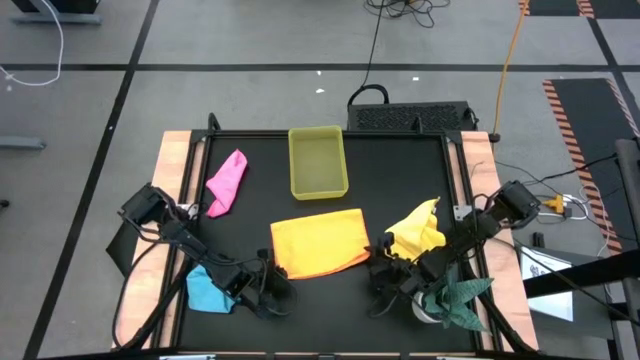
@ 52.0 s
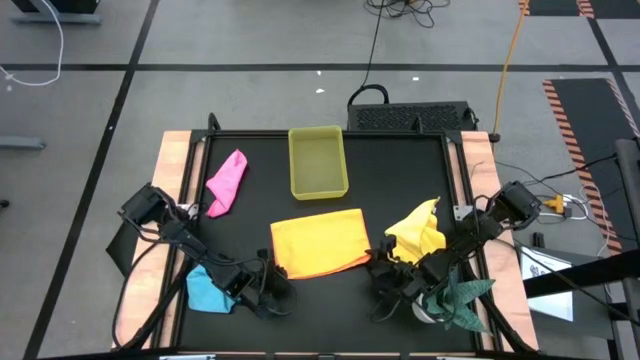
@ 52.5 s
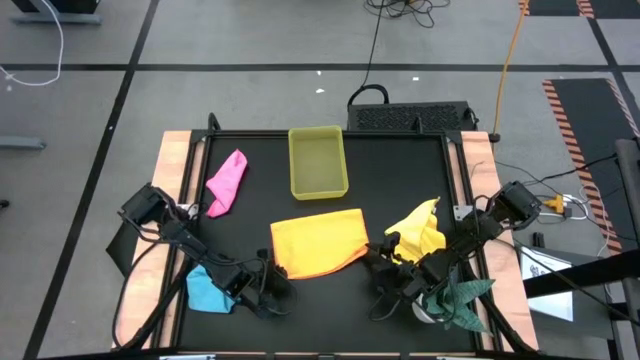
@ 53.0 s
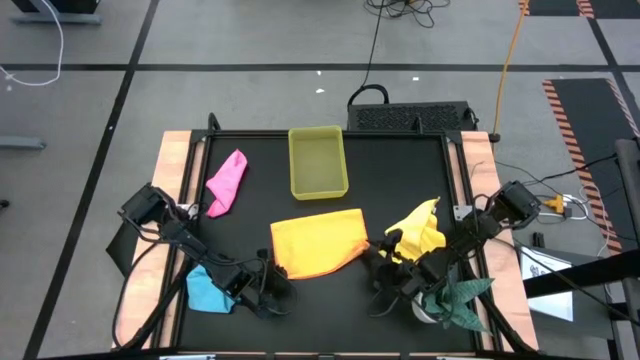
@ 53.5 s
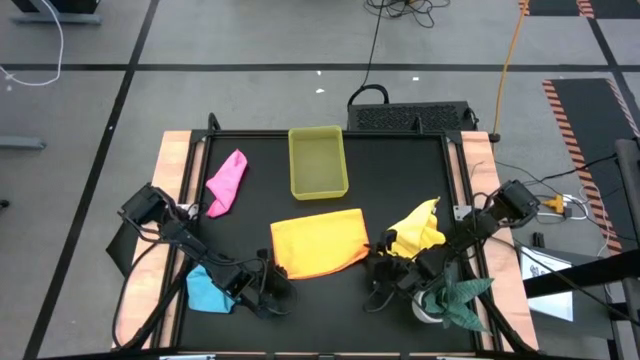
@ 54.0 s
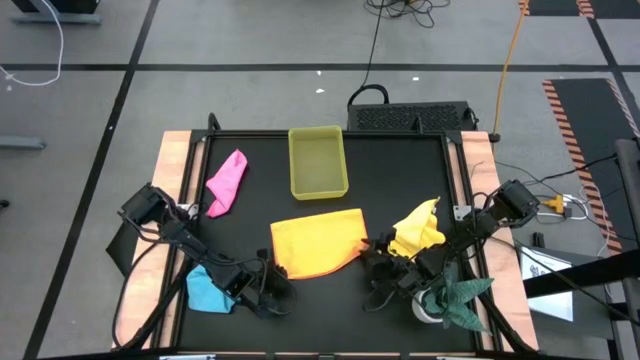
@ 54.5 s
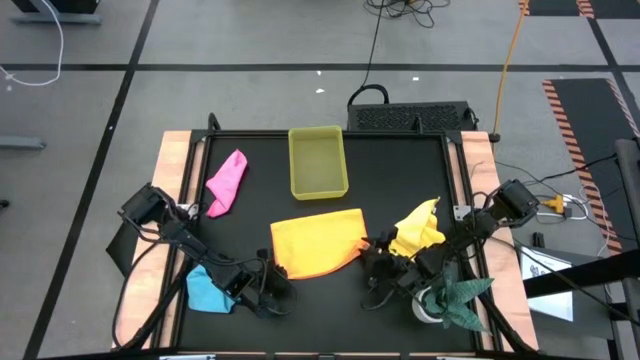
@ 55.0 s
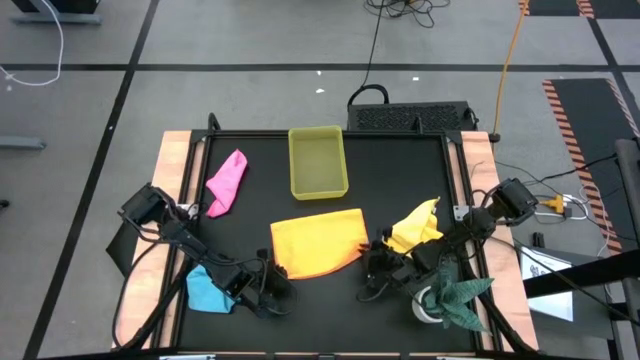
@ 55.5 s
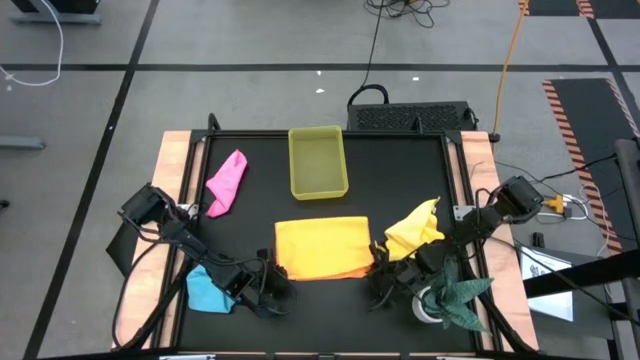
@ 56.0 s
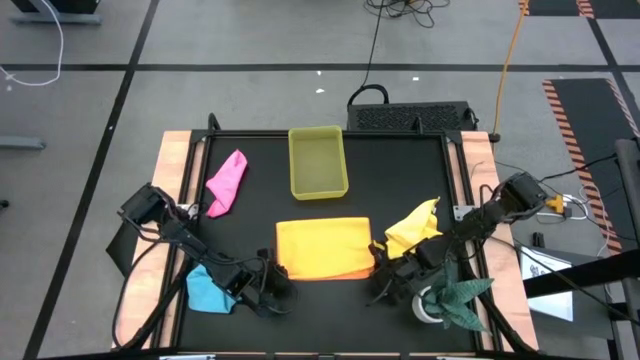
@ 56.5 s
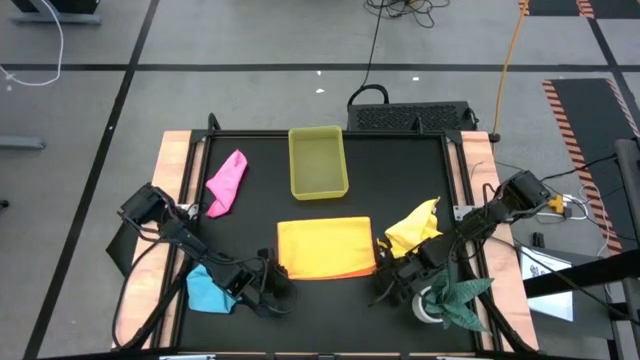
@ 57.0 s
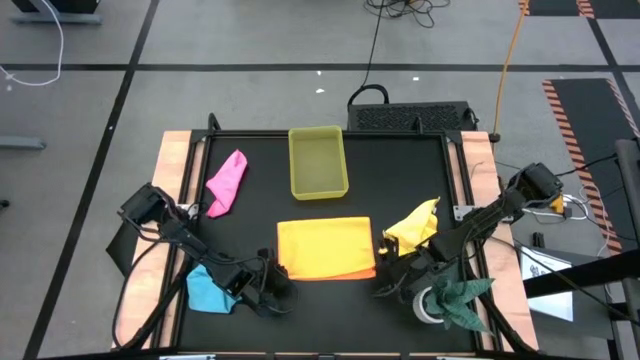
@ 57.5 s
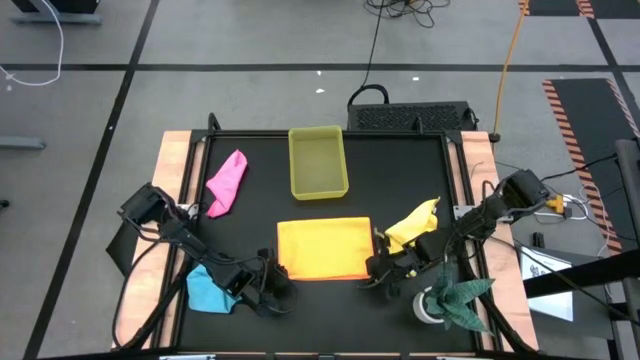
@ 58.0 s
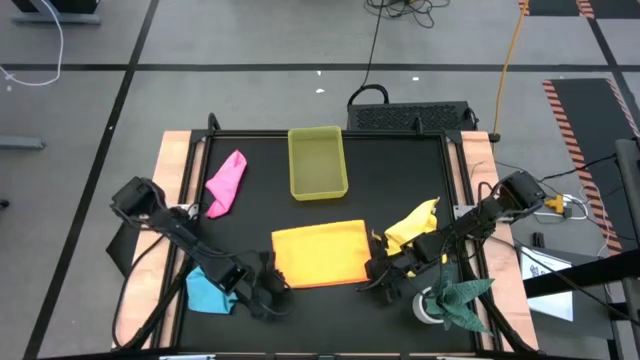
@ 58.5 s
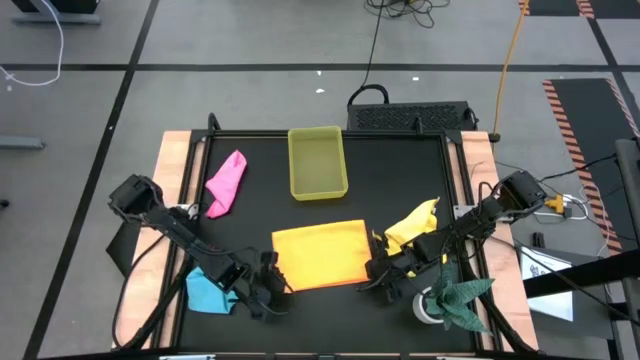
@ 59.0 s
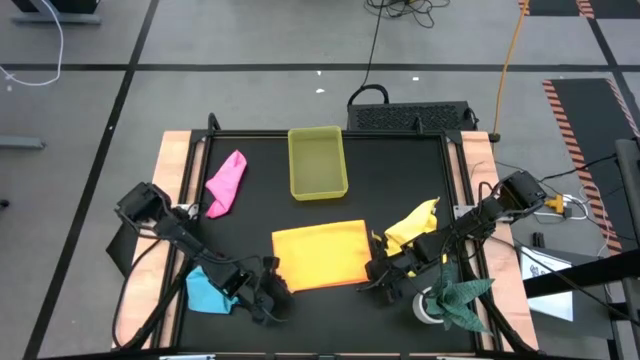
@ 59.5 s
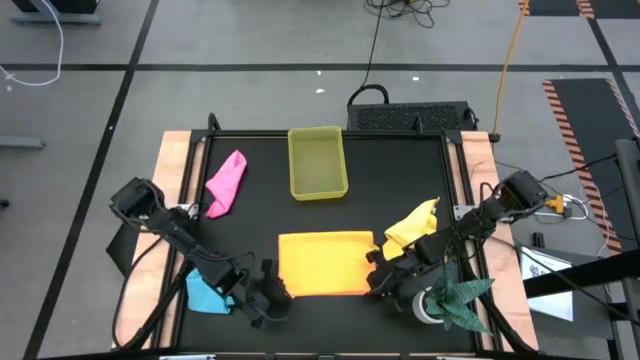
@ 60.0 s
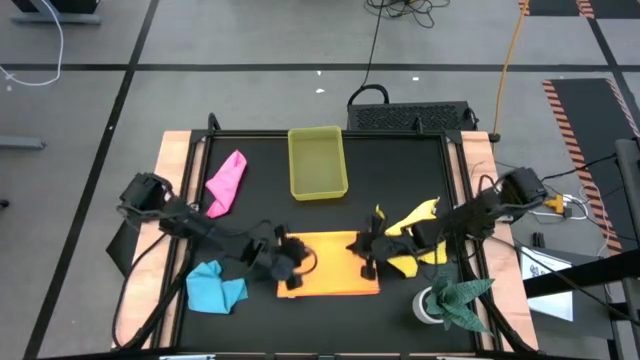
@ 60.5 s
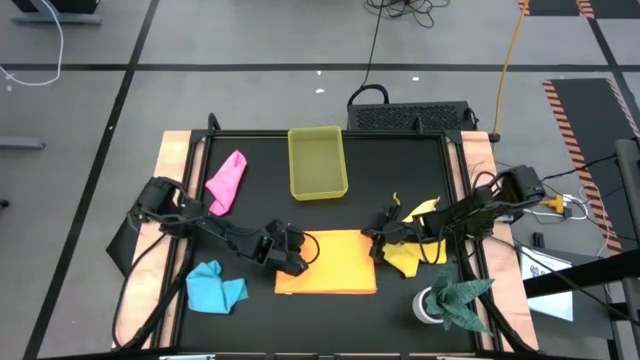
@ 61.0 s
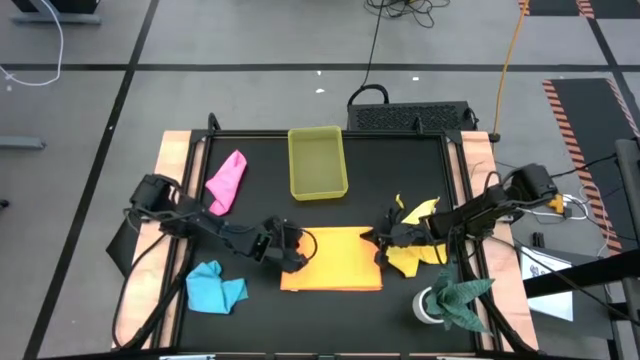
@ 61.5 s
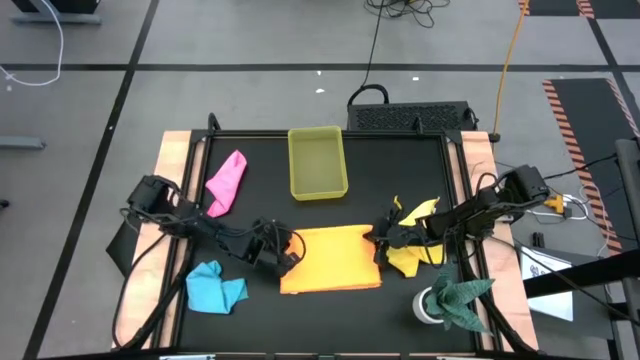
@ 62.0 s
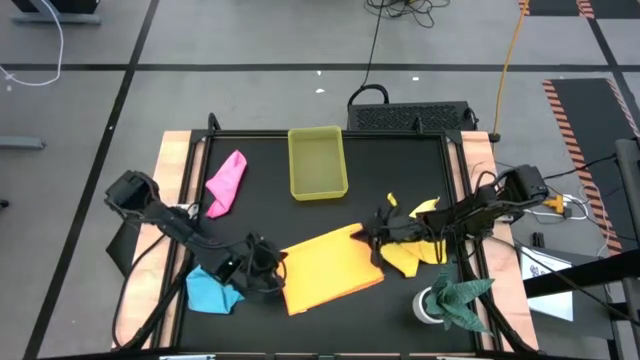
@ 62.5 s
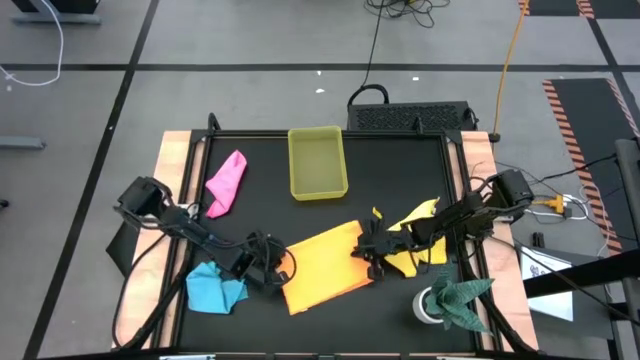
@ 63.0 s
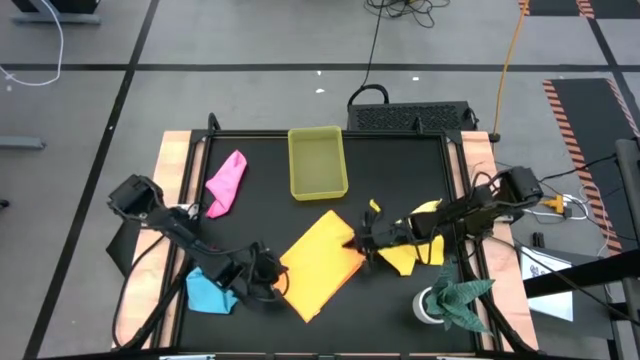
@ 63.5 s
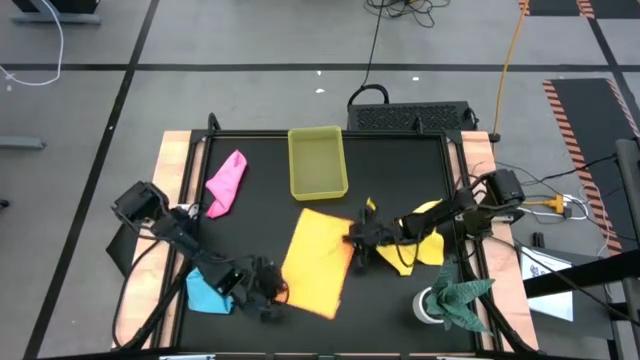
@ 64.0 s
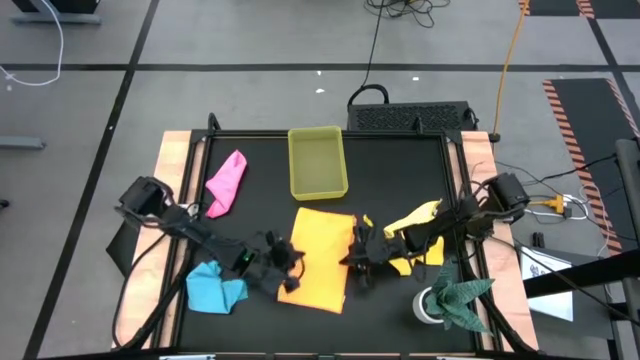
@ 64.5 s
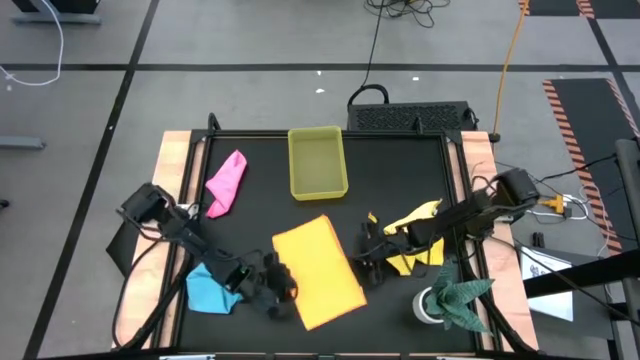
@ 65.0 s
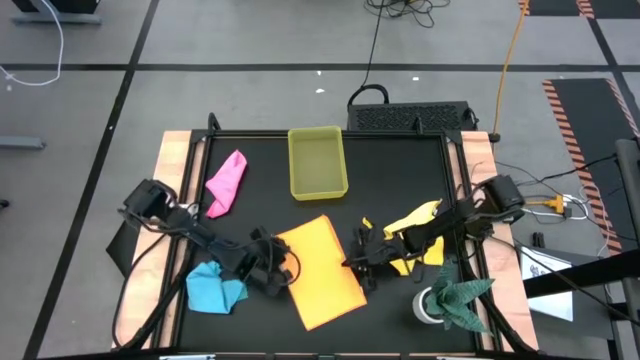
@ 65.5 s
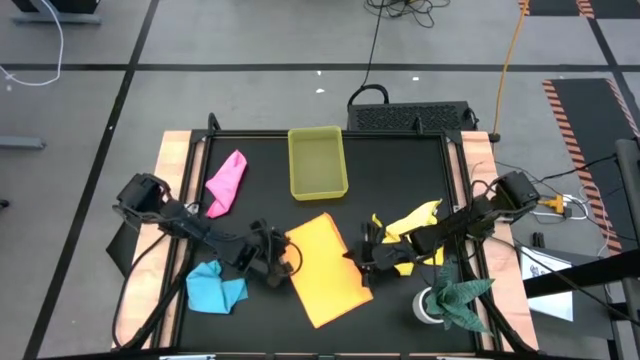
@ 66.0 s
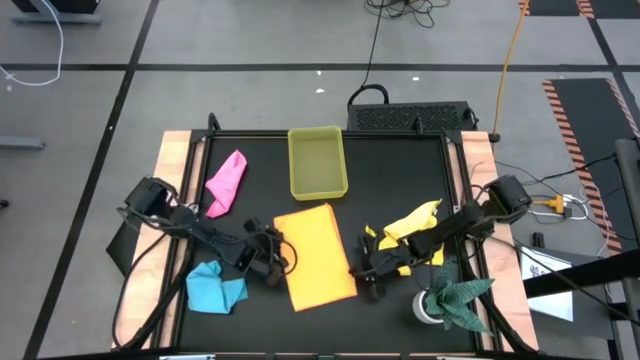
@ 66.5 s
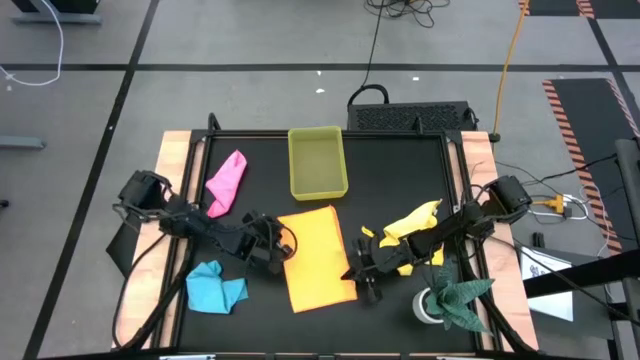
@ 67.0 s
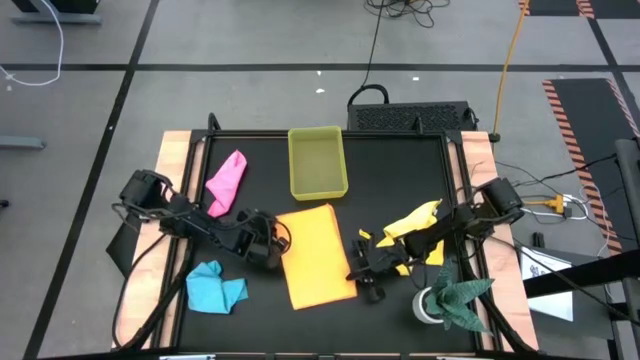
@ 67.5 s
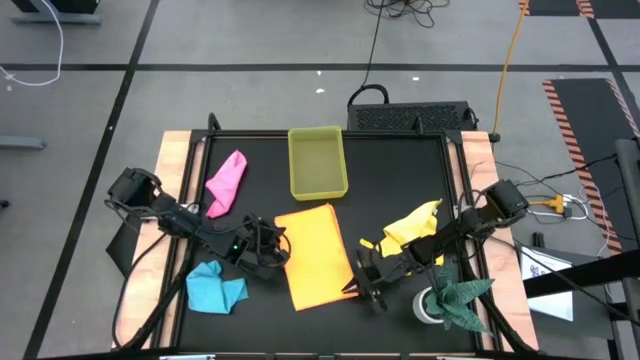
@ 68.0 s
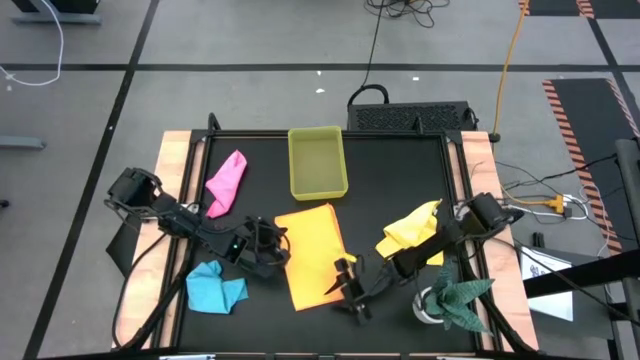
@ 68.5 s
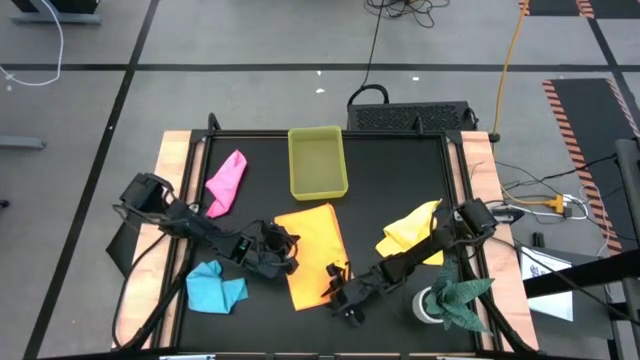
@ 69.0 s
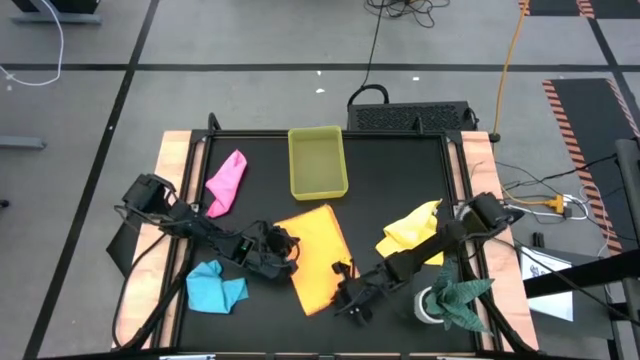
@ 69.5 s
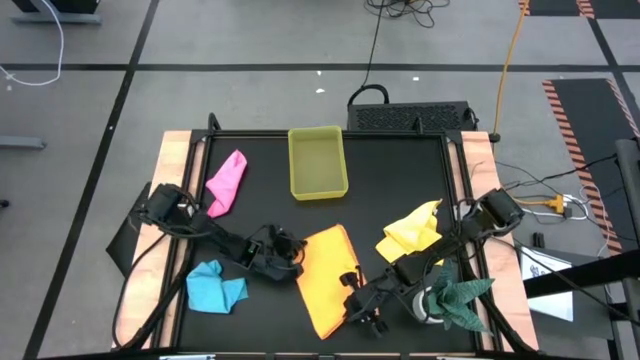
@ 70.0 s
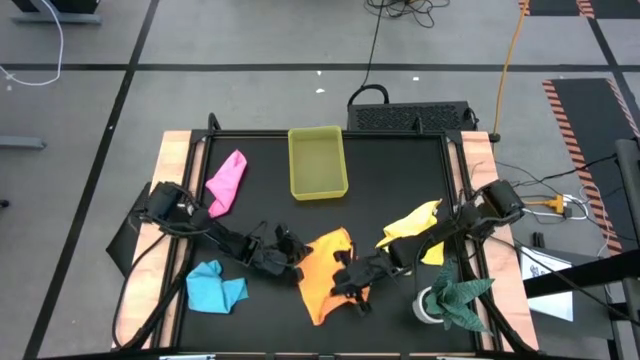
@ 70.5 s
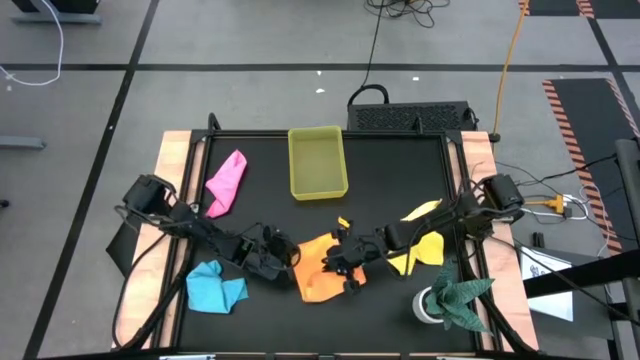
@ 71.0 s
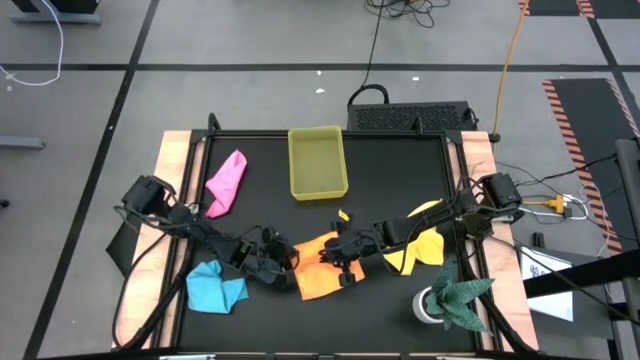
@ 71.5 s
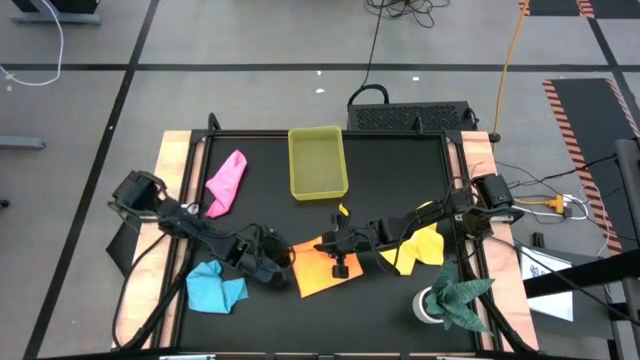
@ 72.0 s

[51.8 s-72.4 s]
Task: Fold microfiber towels
Fold the orange towel
